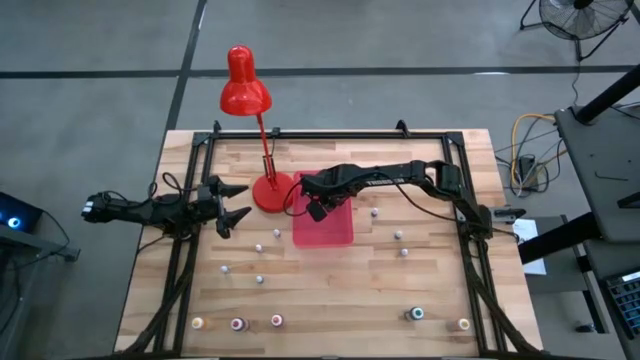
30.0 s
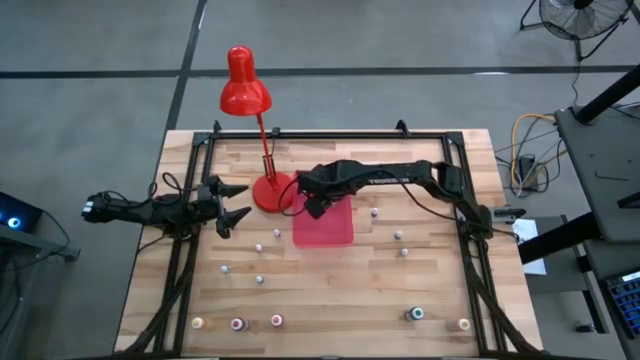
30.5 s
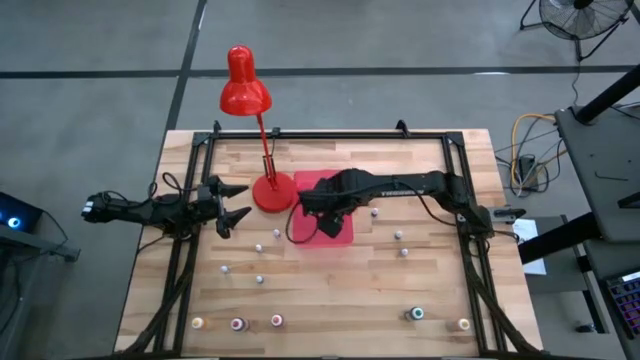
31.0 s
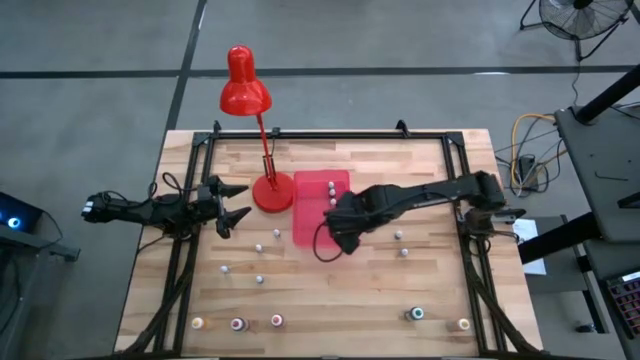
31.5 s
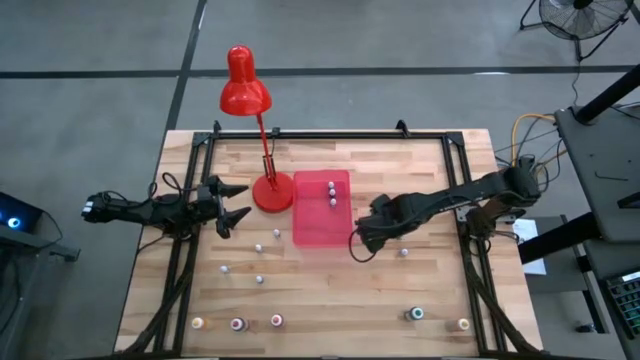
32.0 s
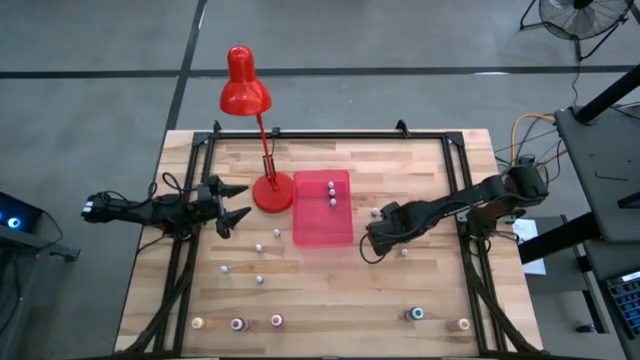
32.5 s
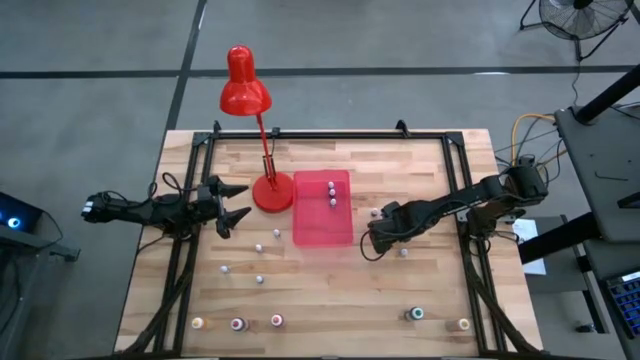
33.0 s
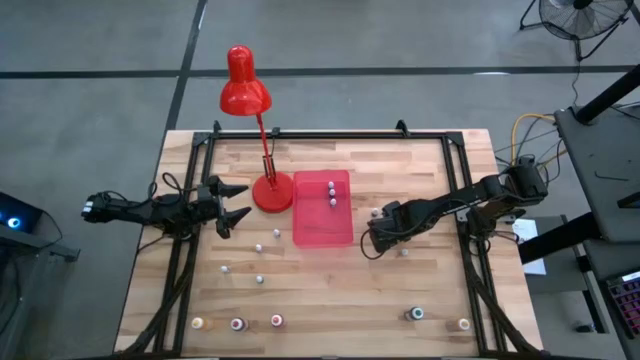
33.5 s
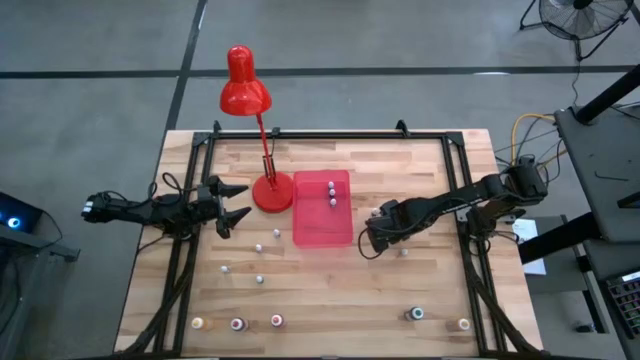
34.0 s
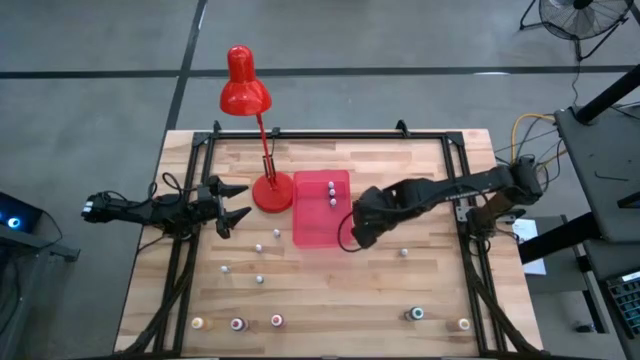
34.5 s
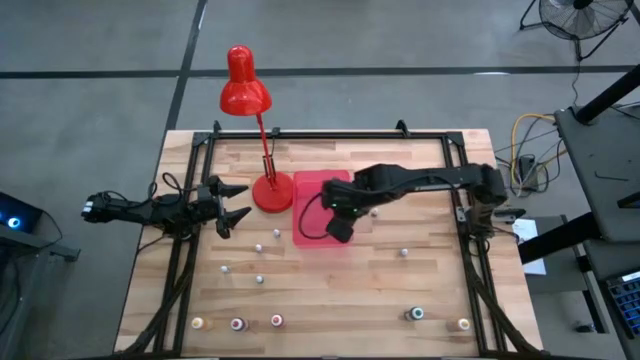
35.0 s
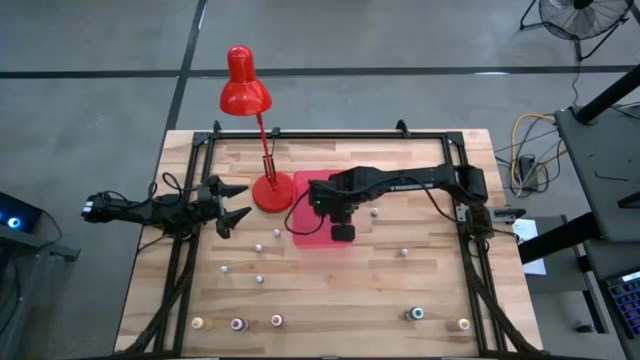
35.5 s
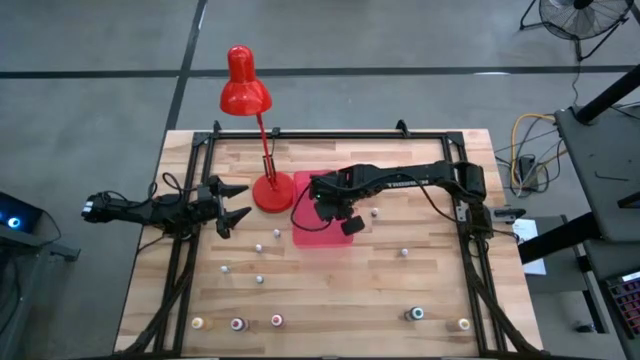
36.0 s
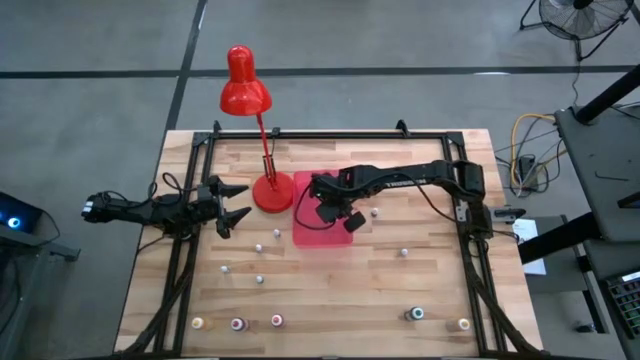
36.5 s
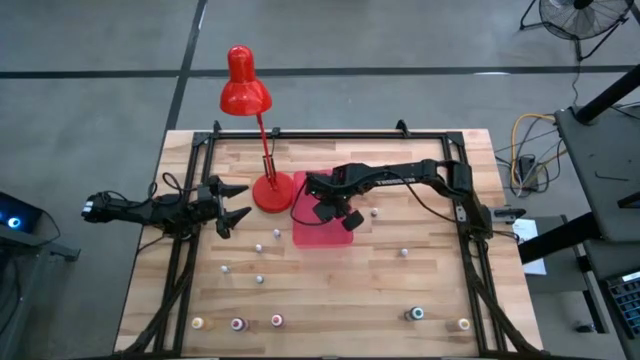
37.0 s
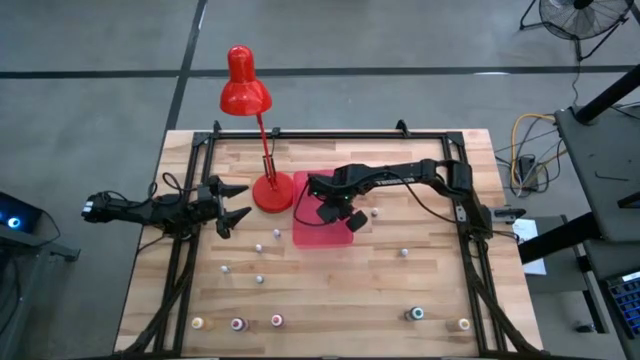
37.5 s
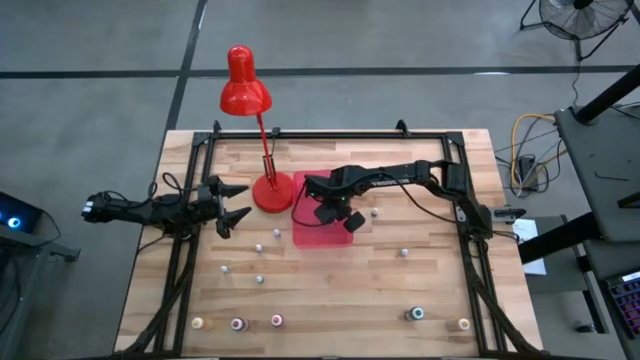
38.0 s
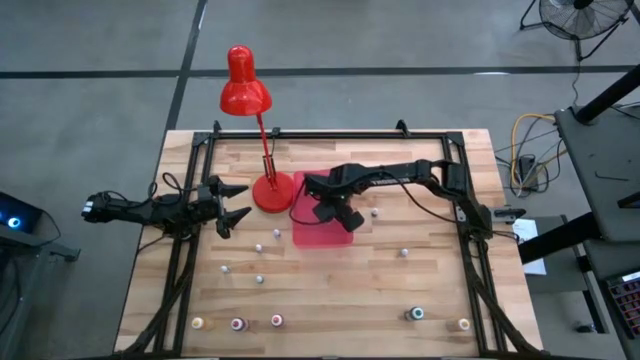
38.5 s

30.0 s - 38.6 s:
Task: Pick & Place food coloring
Put the small black food coloring bottle into the bin

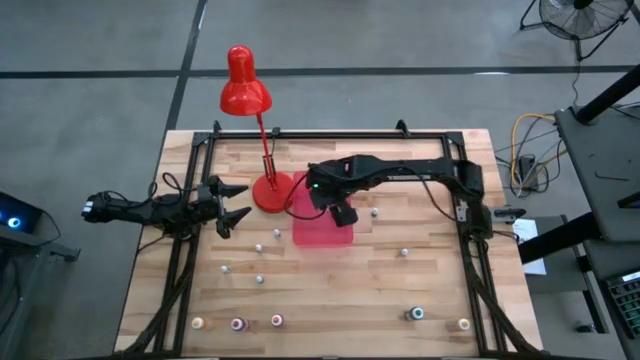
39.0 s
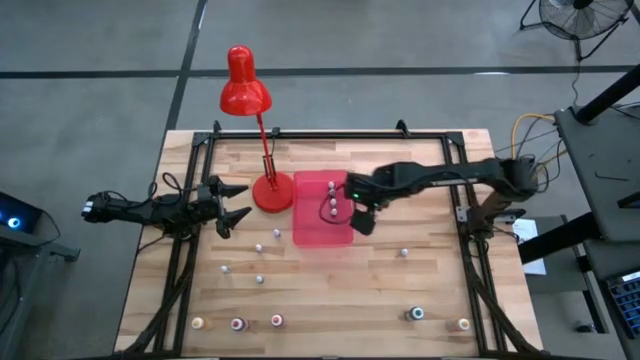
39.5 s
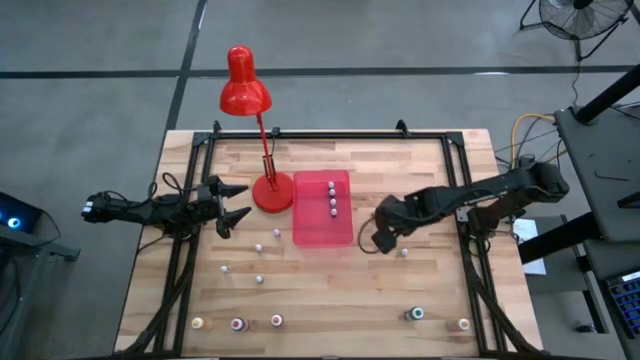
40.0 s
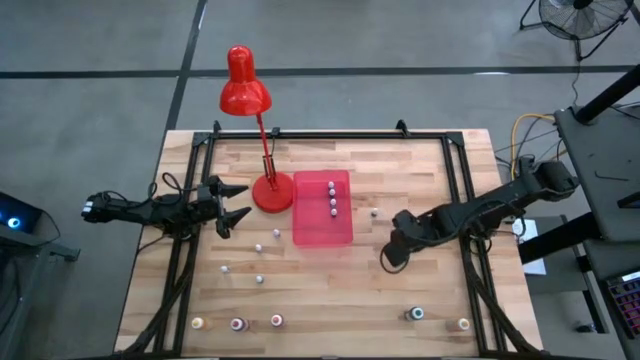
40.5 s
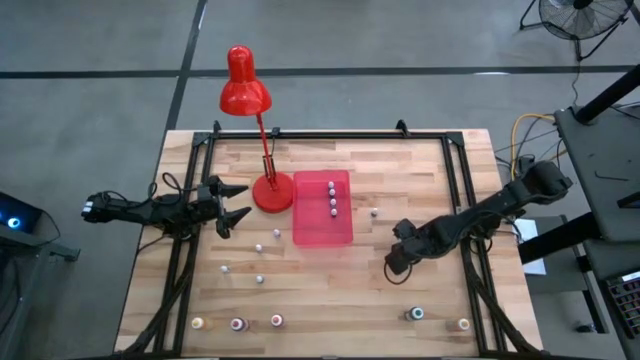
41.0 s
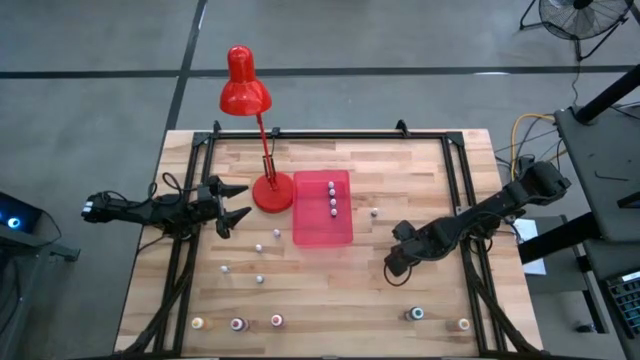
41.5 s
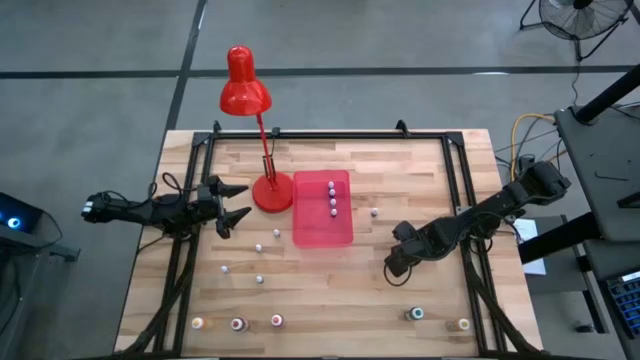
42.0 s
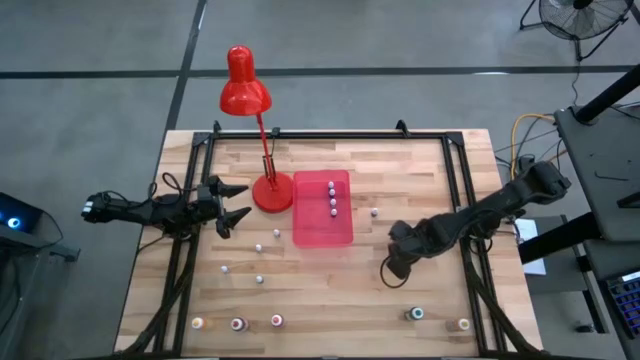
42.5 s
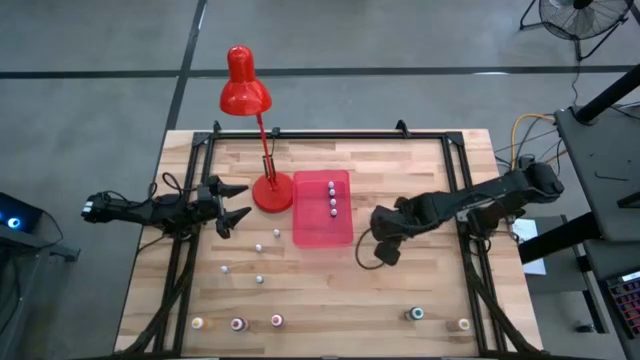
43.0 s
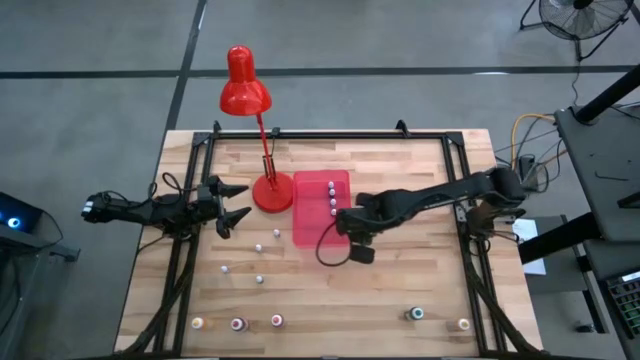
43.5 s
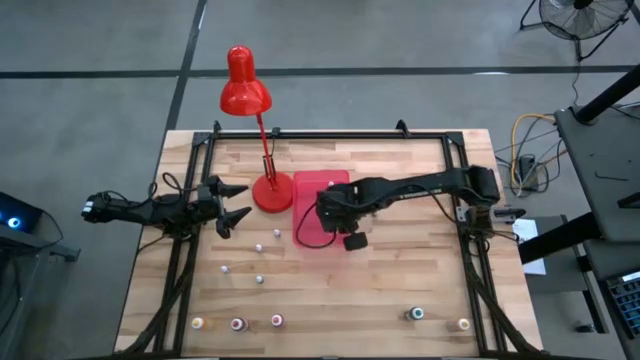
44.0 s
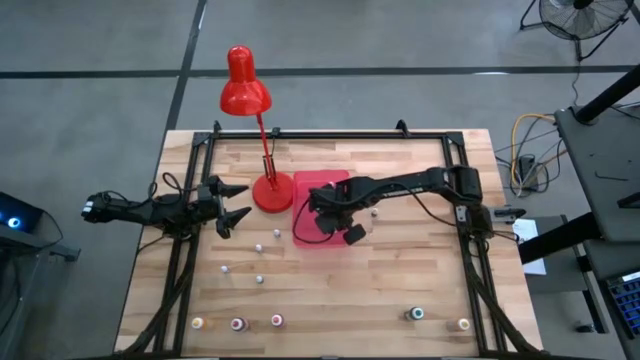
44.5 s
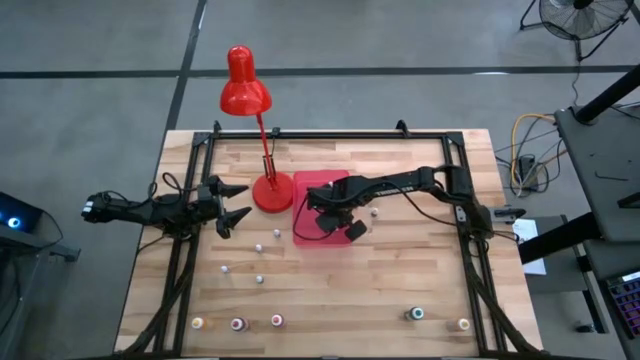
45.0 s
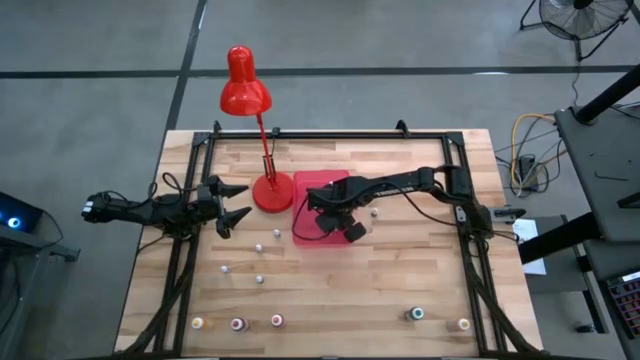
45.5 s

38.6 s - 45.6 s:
Put the small green food coloring bottle into the bin

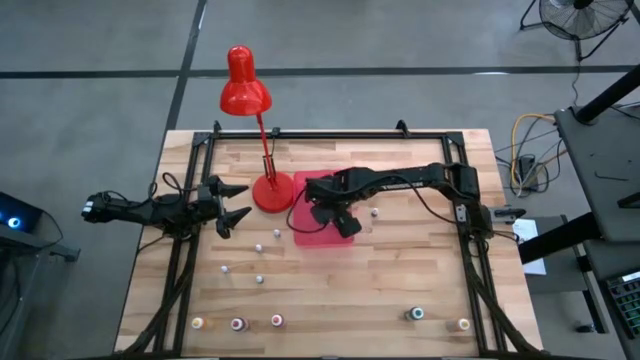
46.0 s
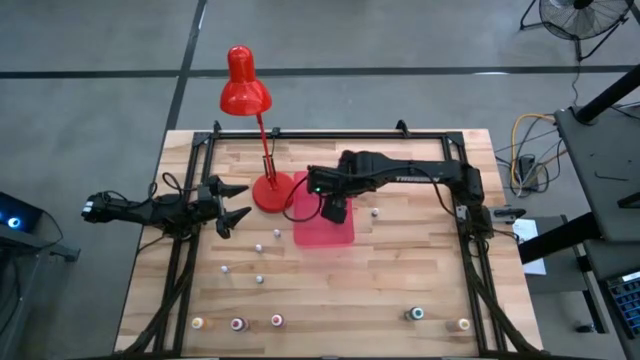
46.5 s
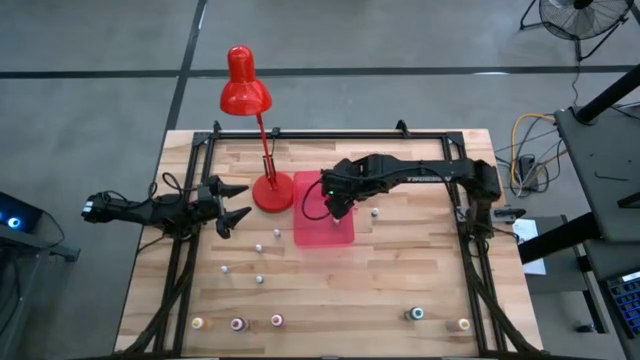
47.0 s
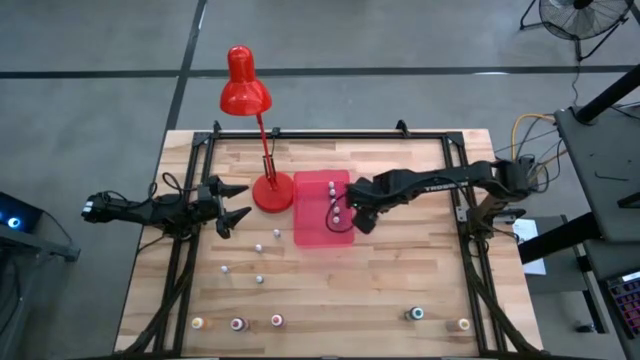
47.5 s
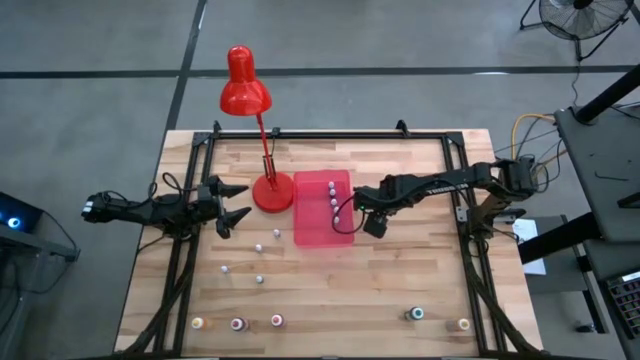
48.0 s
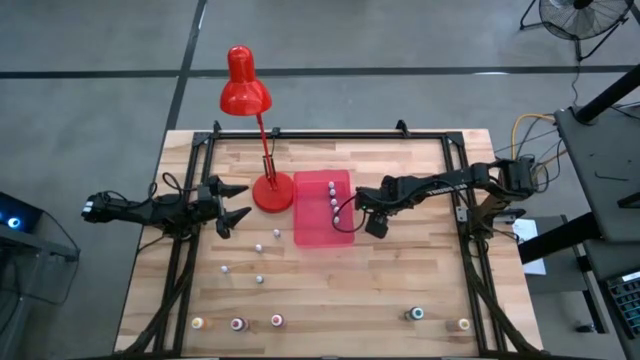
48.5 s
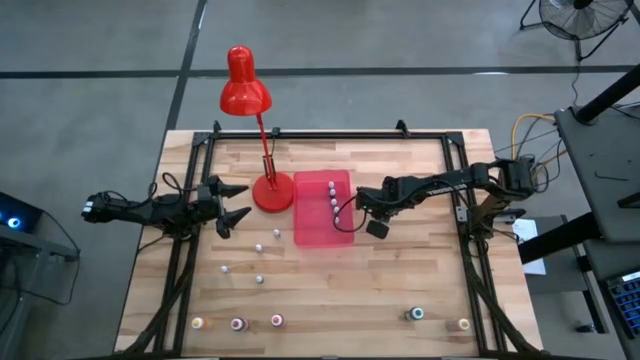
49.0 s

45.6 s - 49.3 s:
Put the small red food coloring bottle into the bin

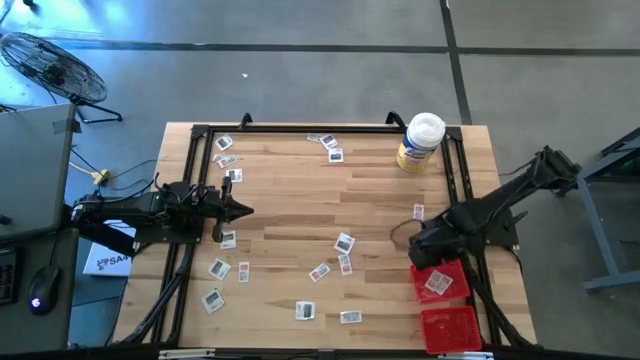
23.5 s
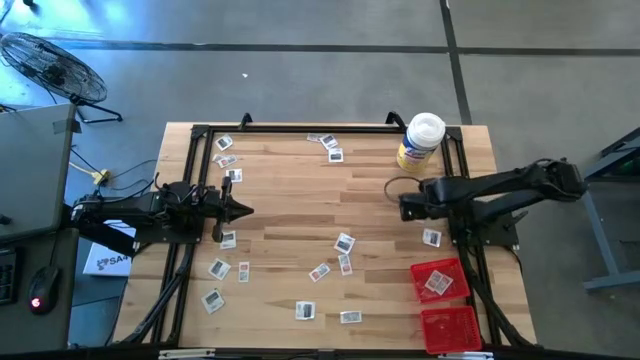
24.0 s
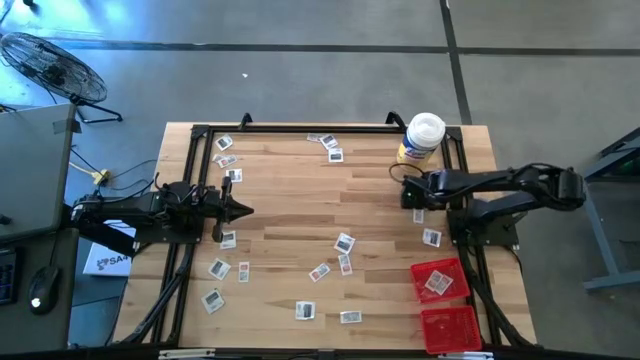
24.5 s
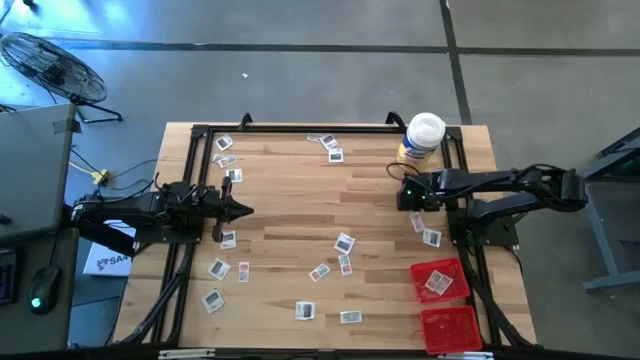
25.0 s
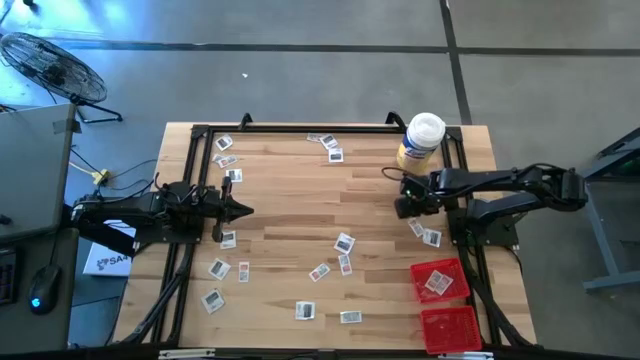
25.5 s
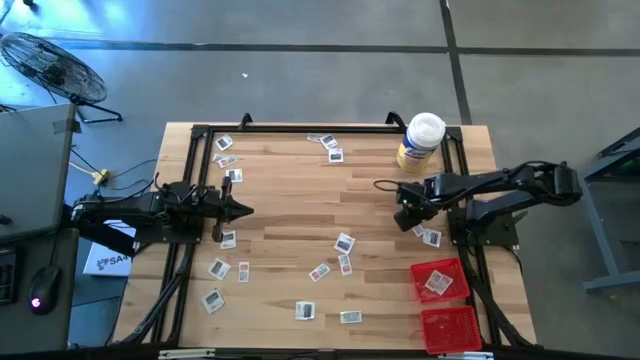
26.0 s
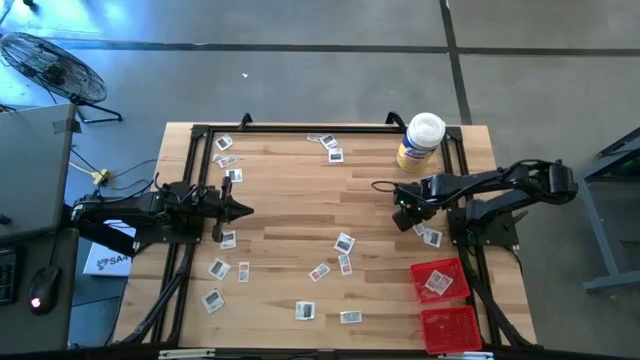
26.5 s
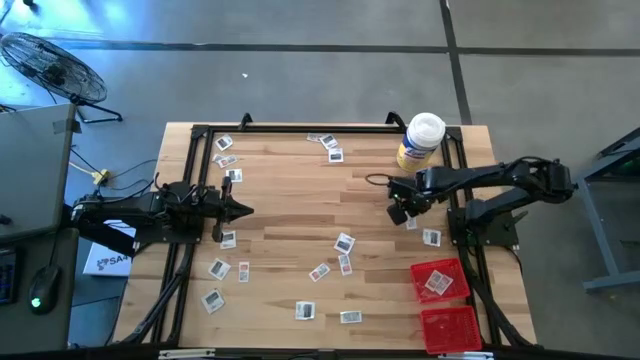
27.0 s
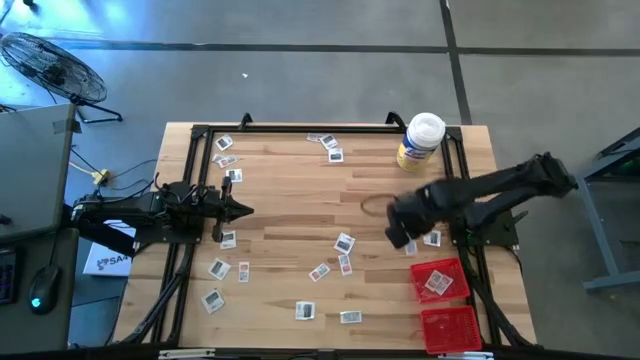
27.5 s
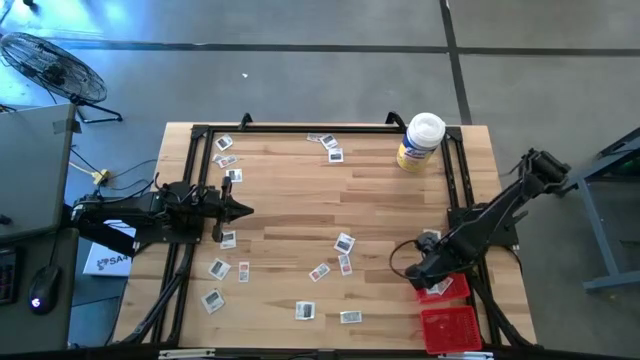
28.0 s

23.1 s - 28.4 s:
Task: Pick & Place First Aid Supplies
Put the white ointment pack into the top red bin
